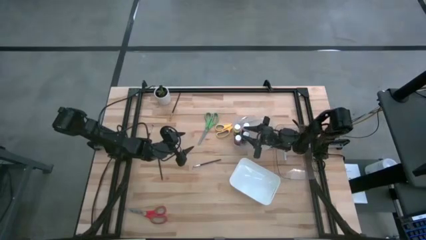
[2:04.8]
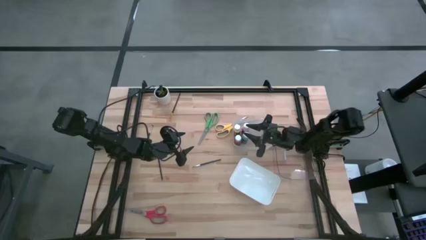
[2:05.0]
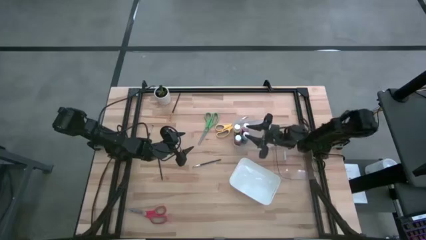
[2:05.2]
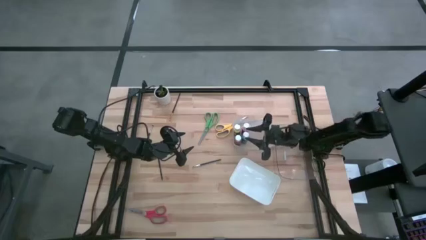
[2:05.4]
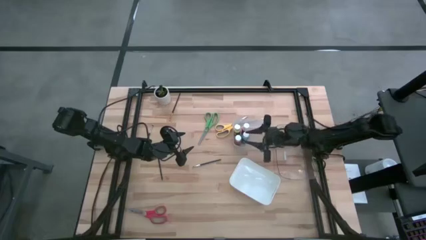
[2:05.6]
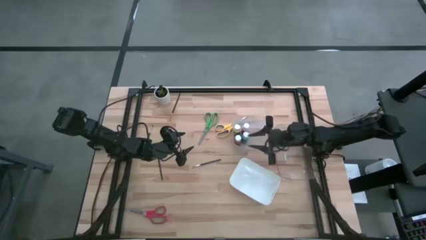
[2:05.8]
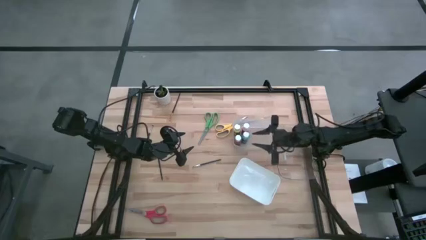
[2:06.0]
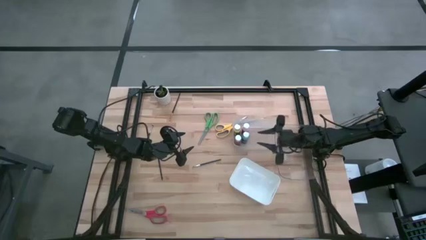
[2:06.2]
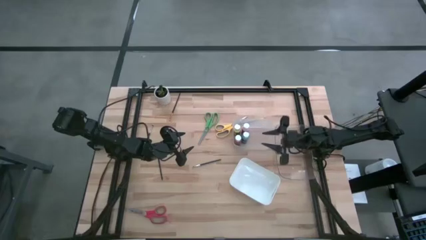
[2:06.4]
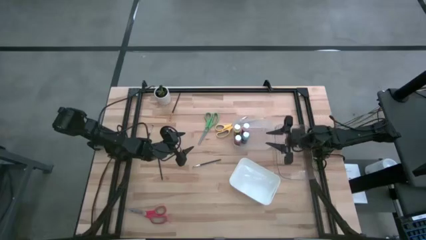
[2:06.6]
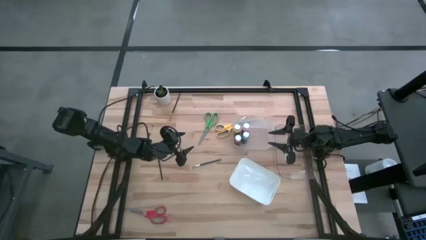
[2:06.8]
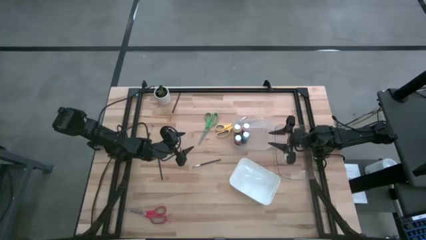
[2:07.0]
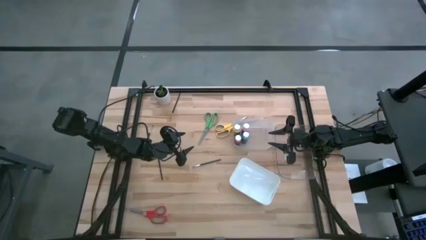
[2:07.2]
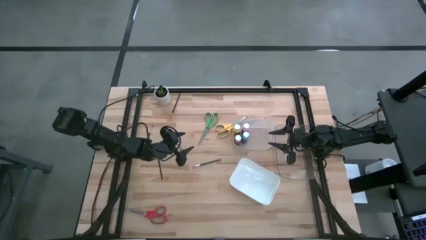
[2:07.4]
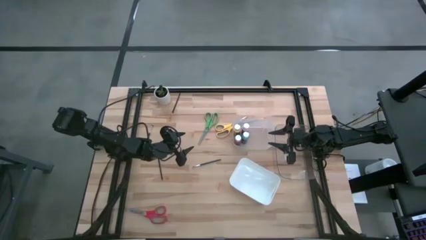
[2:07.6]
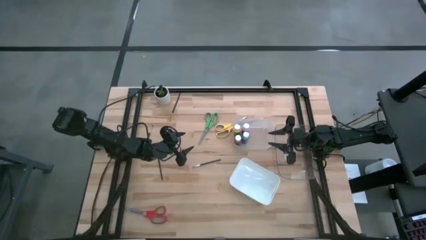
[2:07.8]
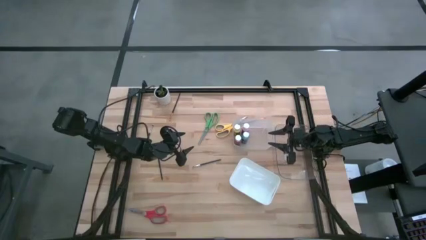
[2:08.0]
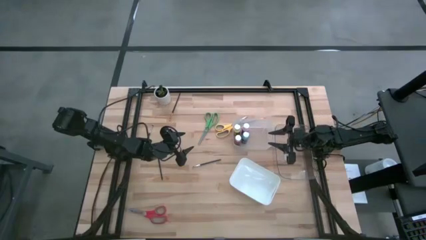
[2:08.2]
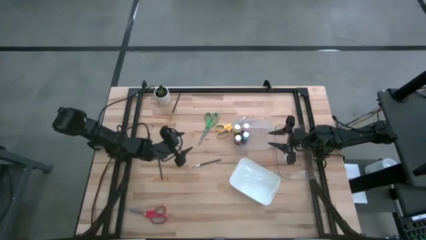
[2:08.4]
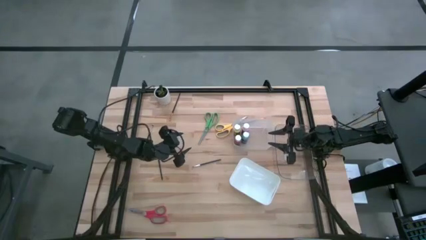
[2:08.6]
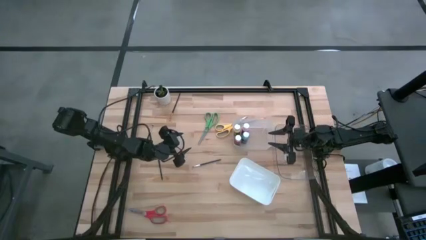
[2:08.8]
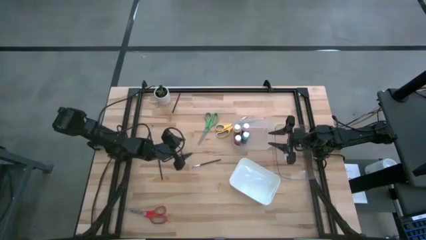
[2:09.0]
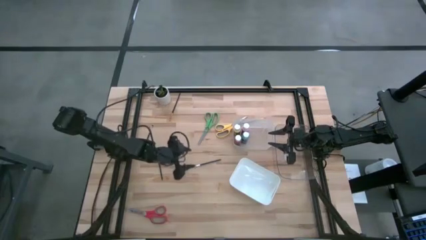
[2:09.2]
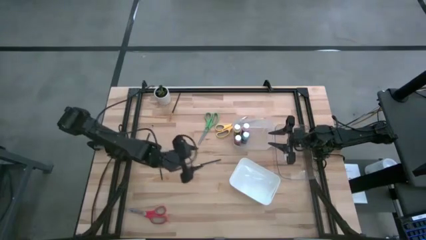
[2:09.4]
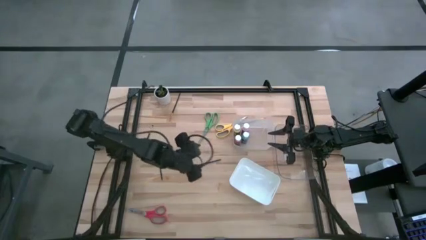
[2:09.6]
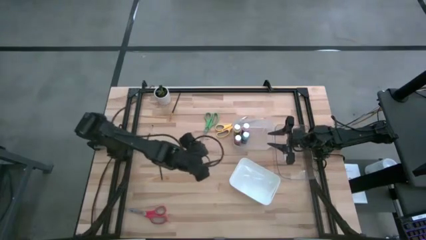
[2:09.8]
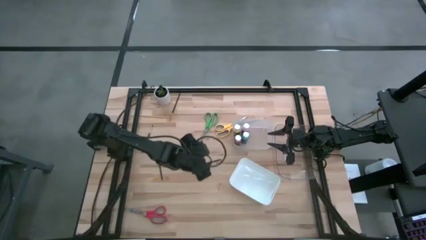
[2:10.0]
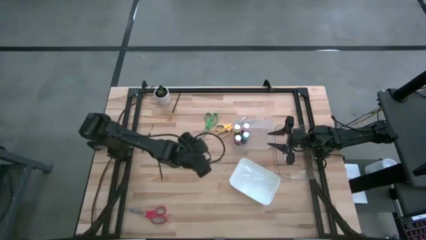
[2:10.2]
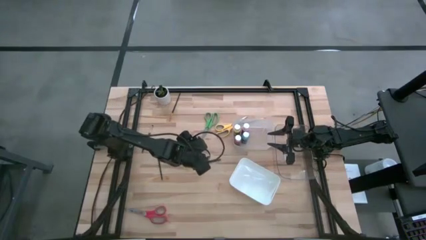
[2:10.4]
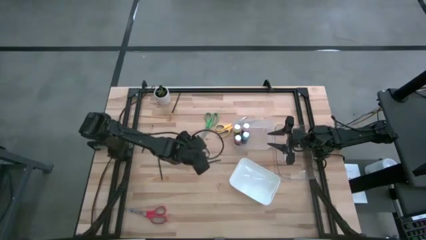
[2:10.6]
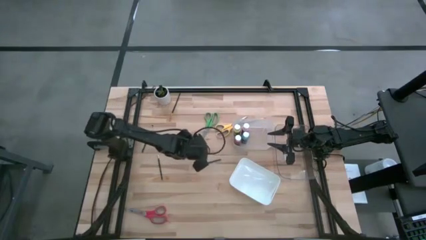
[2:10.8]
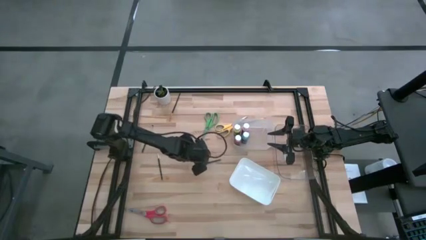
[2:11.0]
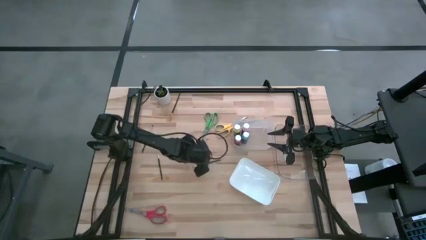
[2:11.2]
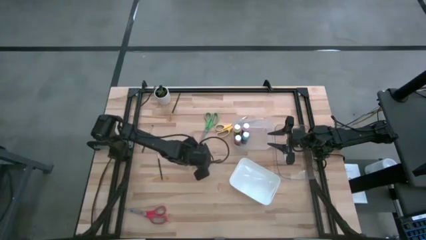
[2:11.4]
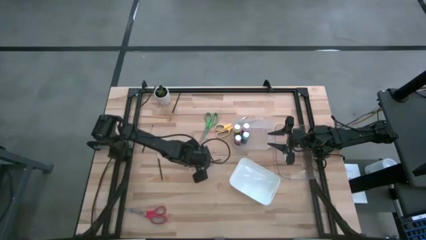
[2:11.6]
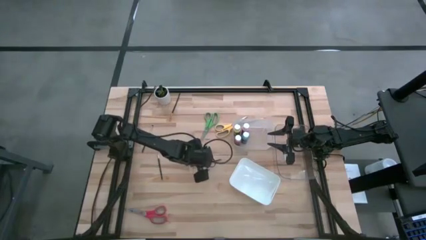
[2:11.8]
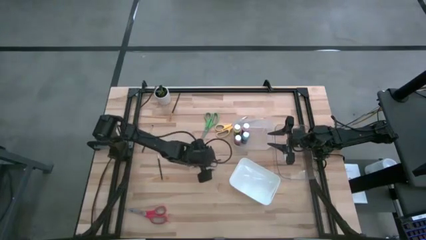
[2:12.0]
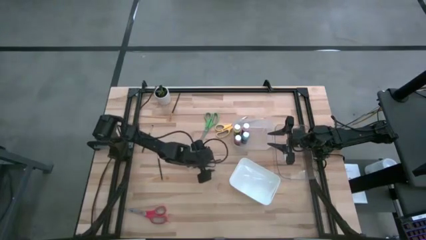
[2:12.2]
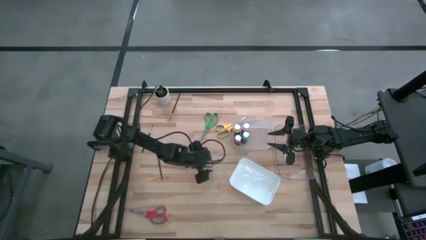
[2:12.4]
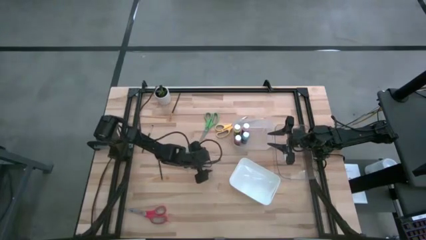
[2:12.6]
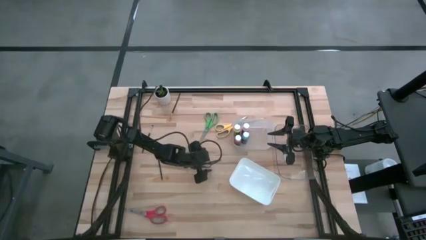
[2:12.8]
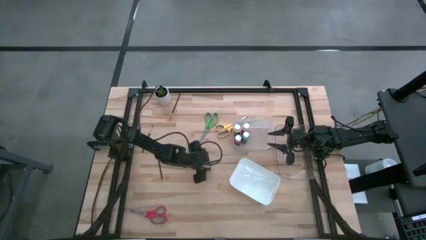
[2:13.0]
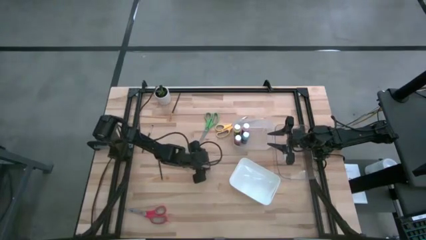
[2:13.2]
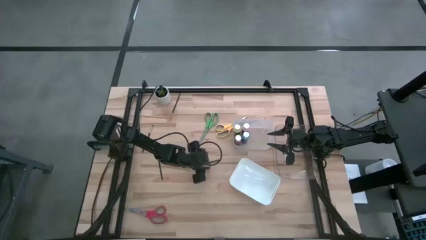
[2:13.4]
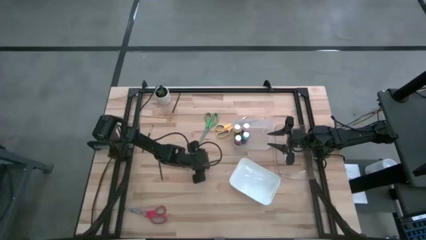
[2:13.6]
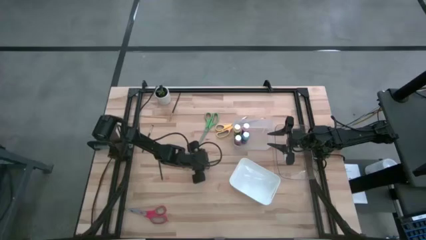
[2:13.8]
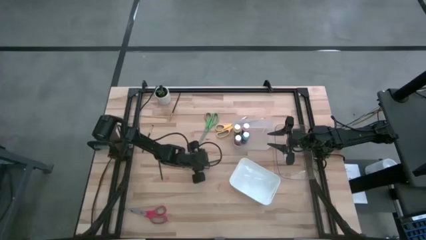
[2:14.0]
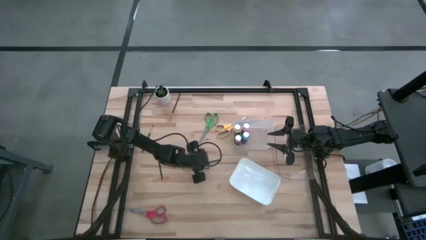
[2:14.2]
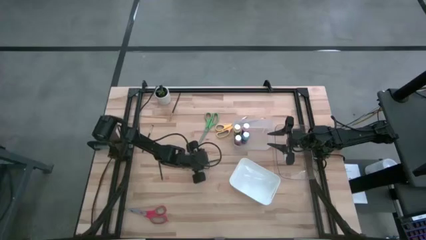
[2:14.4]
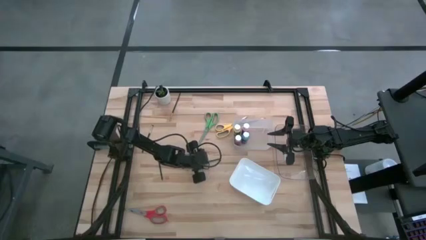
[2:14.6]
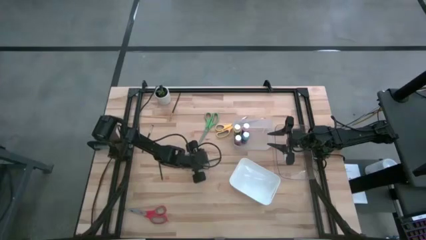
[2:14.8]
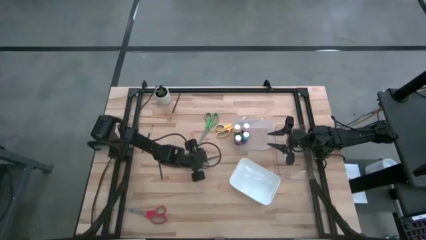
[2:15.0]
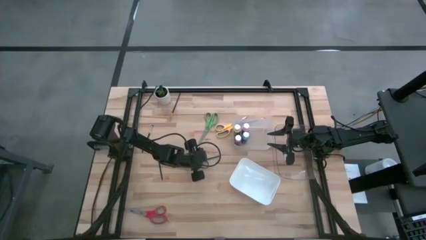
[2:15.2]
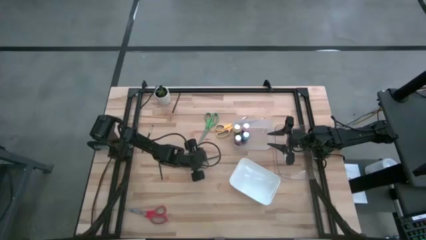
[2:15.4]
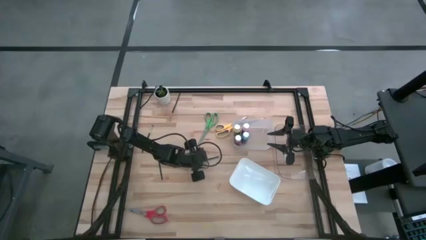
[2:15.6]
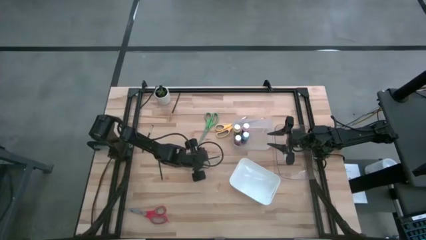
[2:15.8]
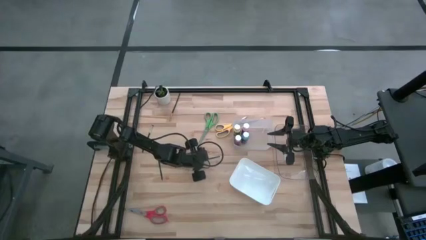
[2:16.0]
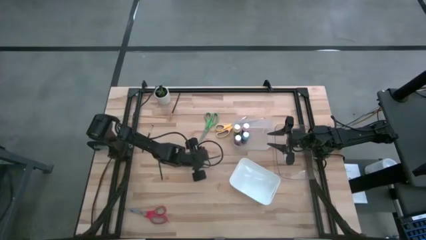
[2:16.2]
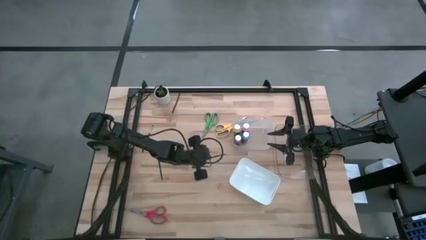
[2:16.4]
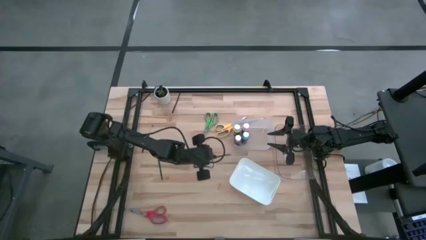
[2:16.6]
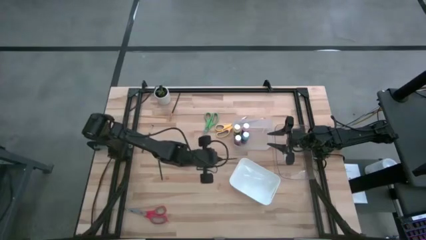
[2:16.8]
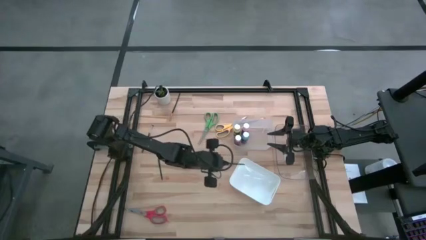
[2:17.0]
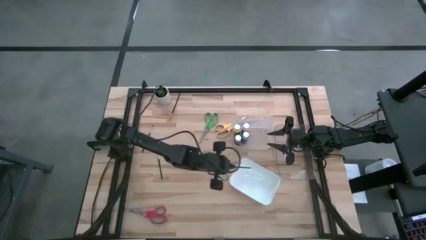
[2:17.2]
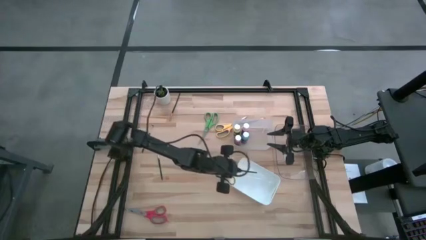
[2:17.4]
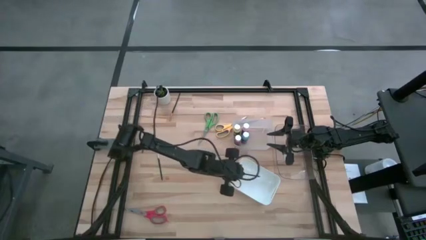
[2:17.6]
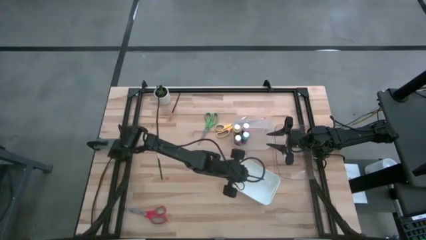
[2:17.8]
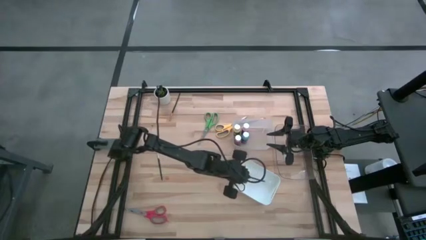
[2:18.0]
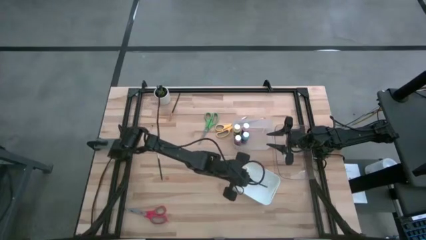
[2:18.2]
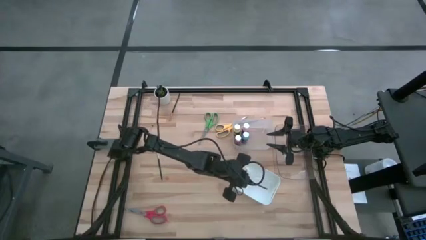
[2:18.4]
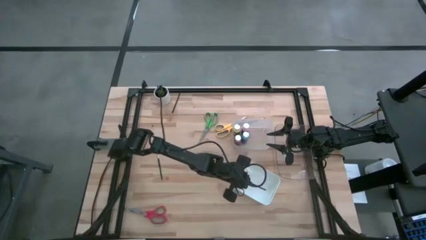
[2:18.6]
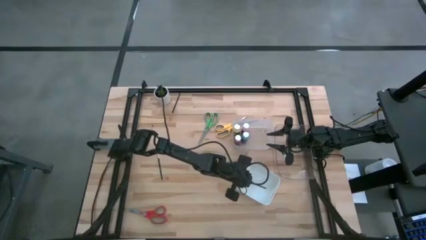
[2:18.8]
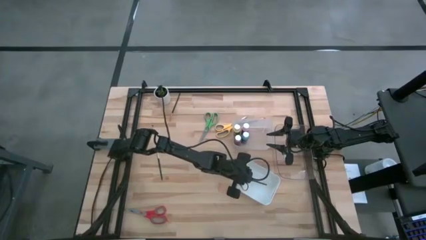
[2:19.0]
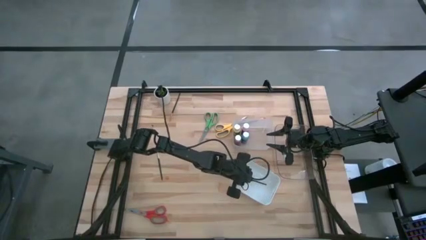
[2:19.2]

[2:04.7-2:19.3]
Task: Pick & Place Paint Supplies
Put the black paintbrush into the white bin

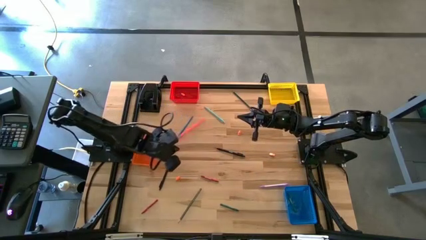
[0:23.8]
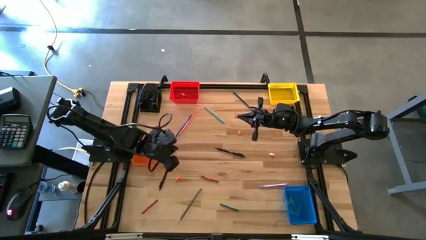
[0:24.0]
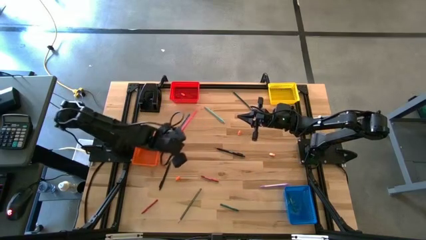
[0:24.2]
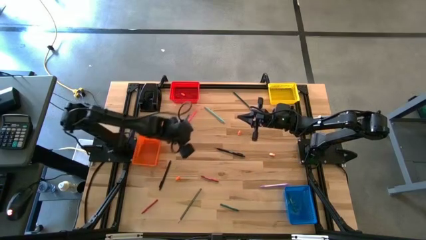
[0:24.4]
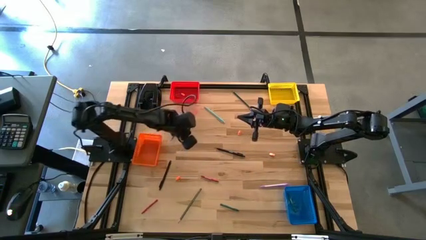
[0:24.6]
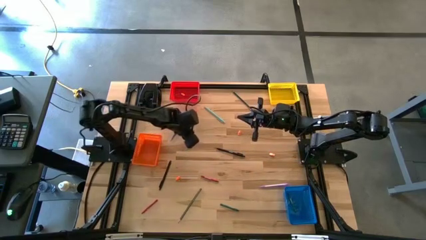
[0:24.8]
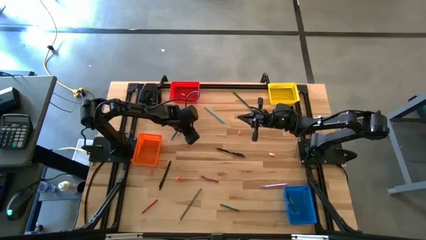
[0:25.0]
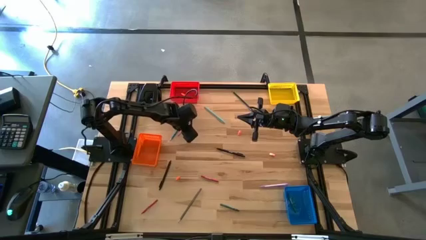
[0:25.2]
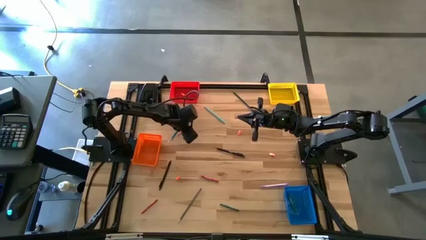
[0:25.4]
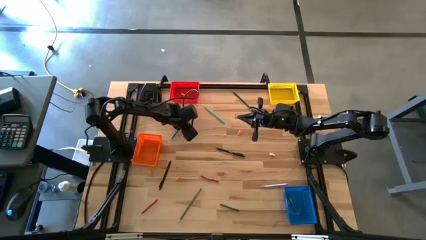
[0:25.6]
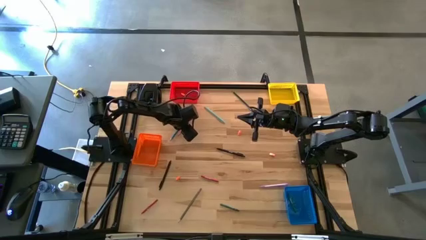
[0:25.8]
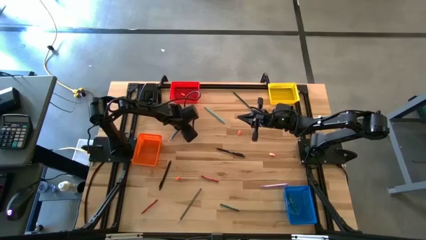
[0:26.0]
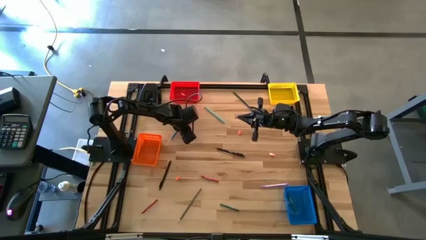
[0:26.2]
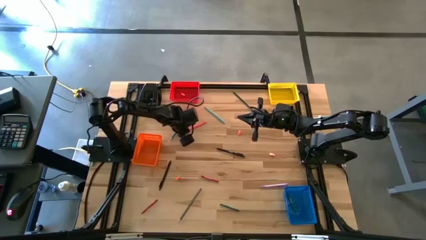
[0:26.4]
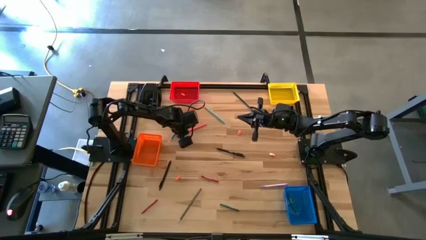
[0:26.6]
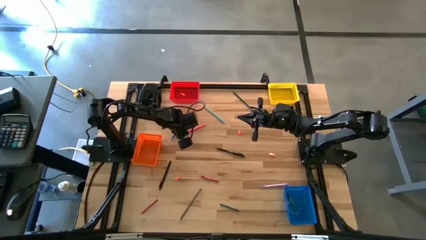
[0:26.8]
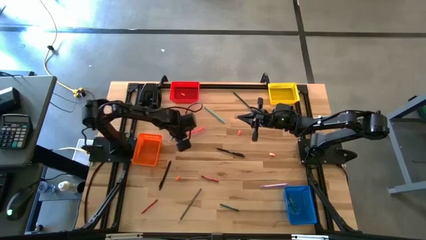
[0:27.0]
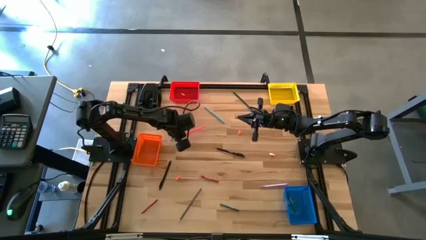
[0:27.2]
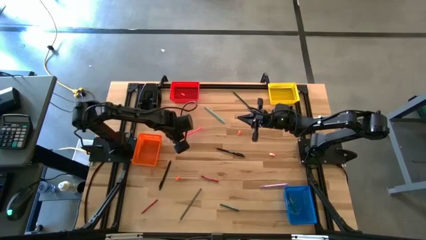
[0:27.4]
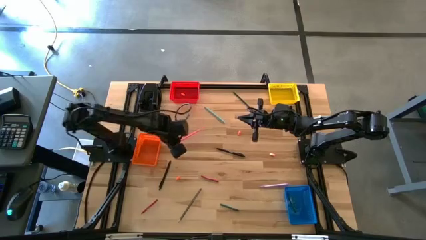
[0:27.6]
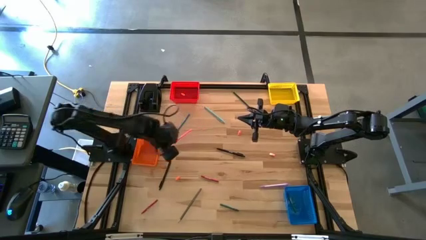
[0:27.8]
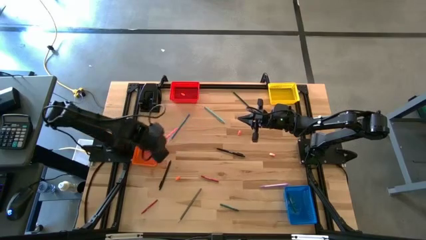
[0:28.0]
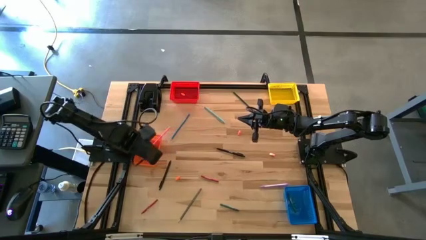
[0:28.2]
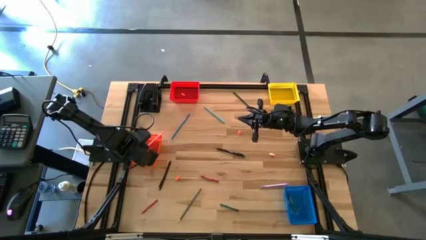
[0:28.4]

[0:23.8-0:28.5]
Task: Sort crayons/erasers/pens/pencils in bins
Put the pink pencil into the orange basket
